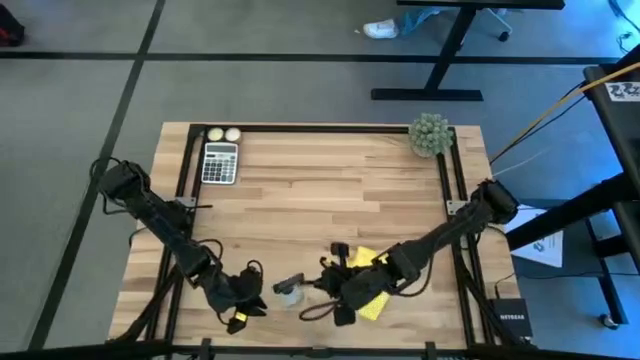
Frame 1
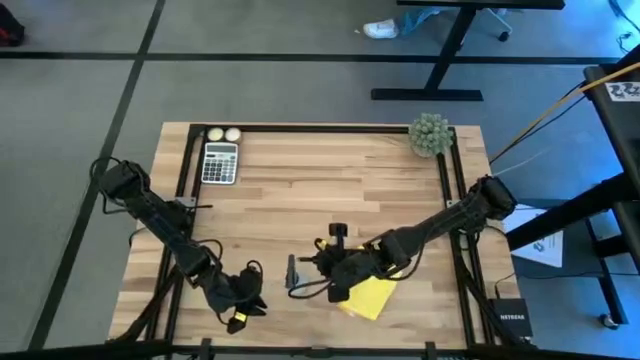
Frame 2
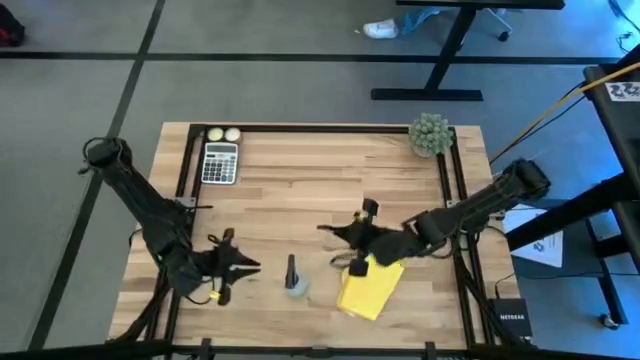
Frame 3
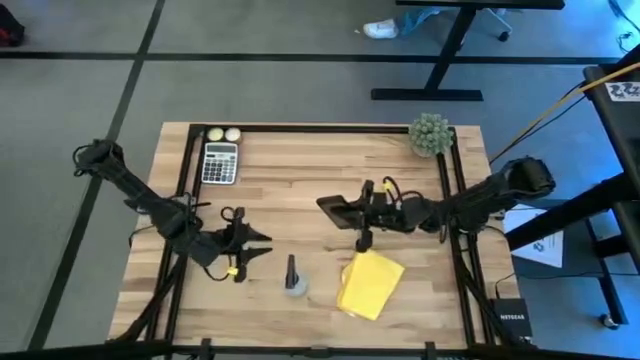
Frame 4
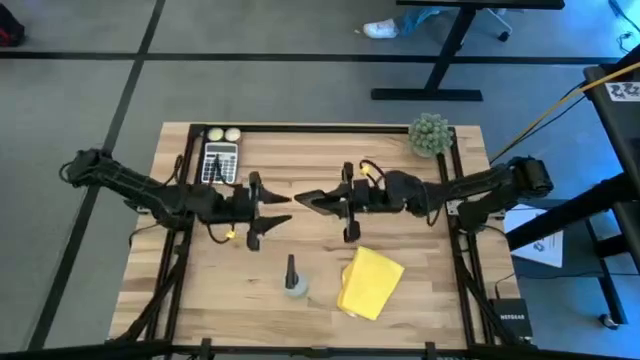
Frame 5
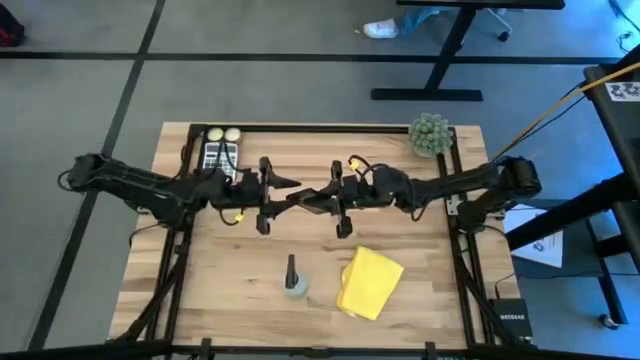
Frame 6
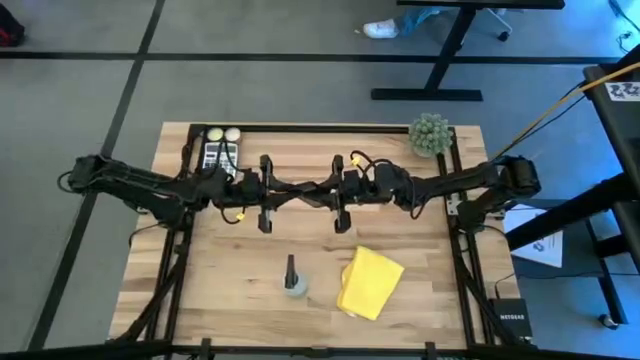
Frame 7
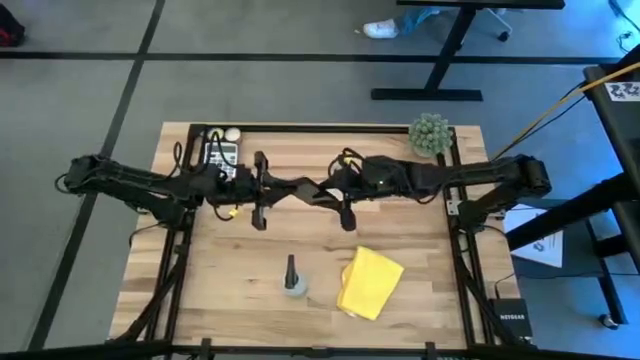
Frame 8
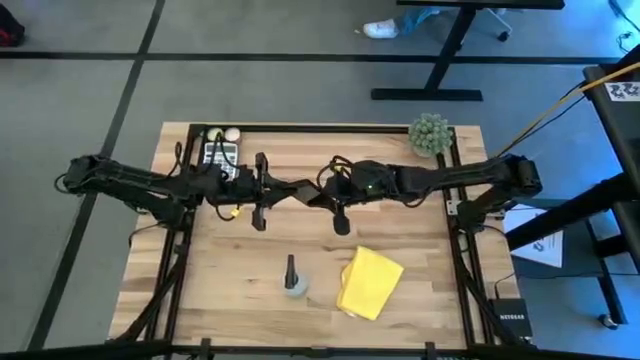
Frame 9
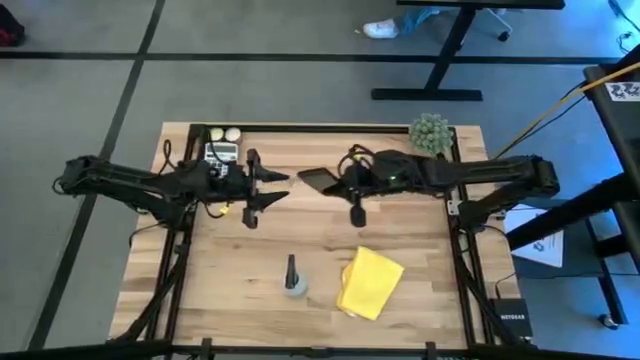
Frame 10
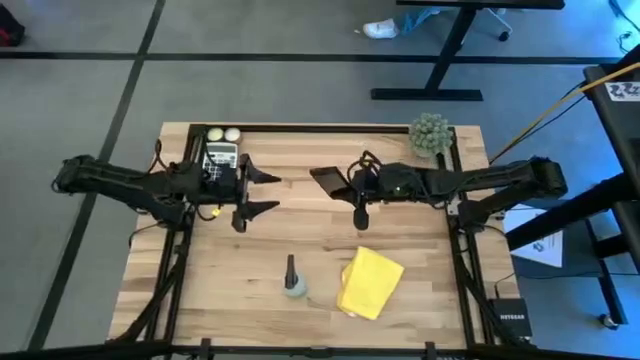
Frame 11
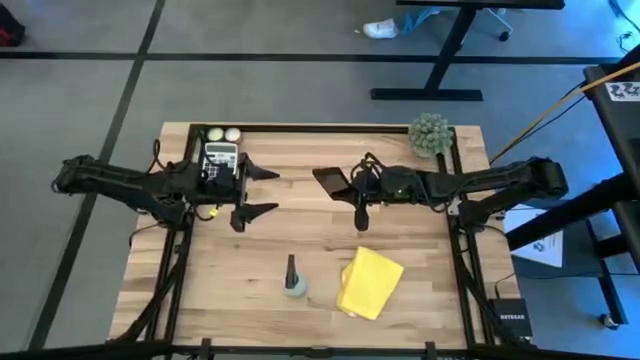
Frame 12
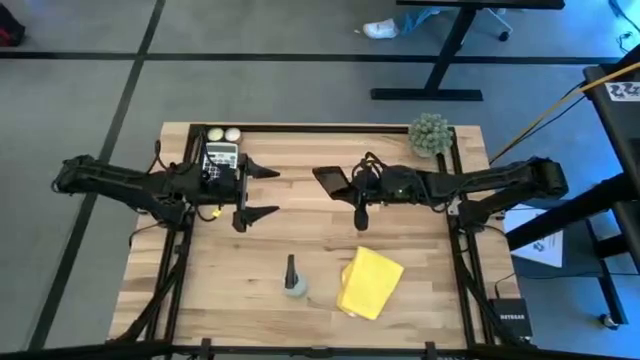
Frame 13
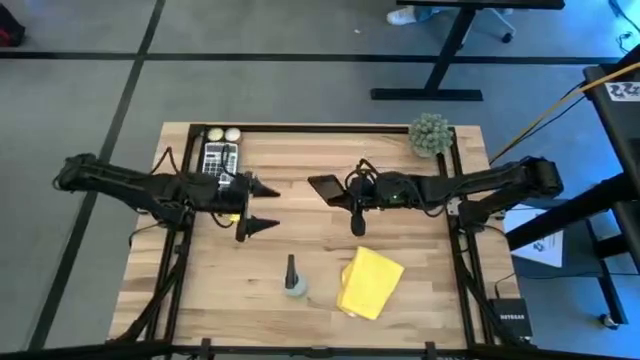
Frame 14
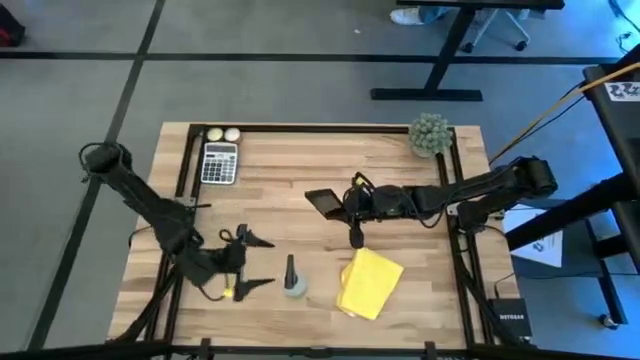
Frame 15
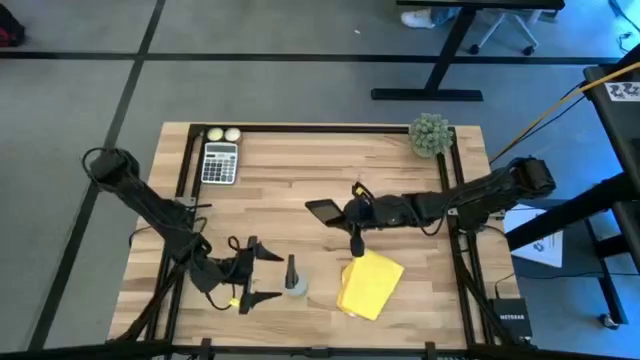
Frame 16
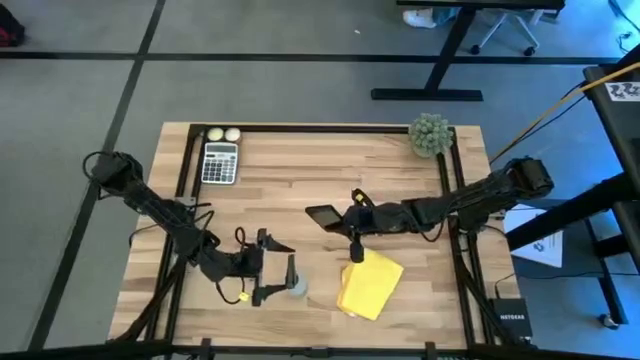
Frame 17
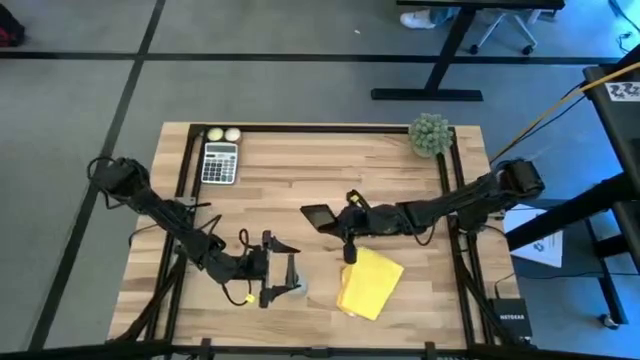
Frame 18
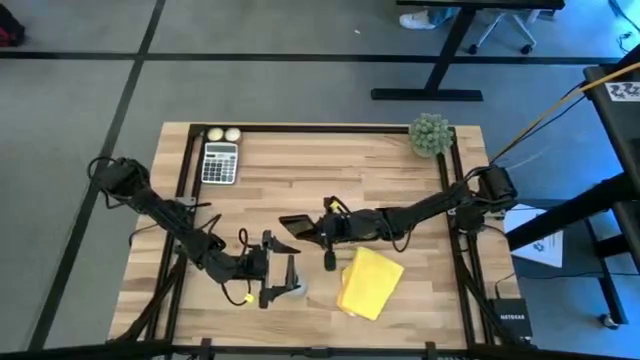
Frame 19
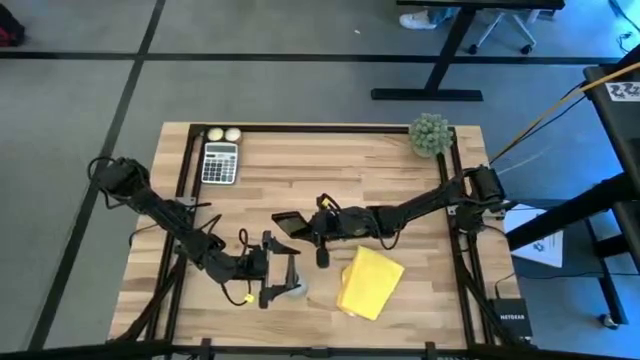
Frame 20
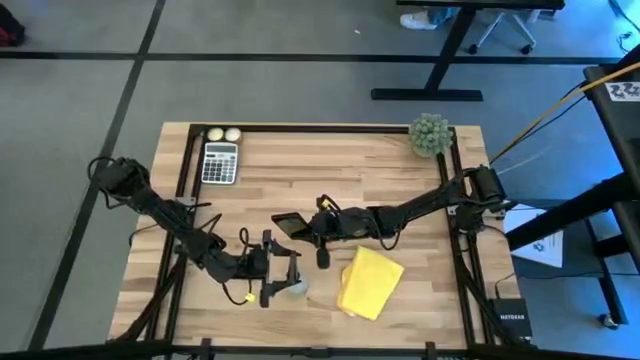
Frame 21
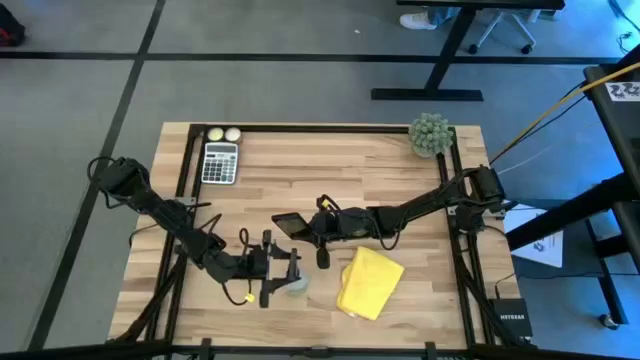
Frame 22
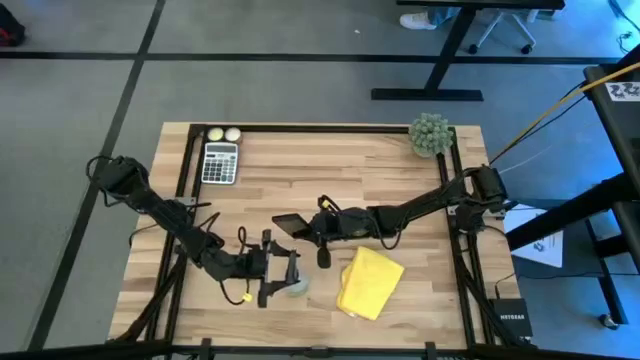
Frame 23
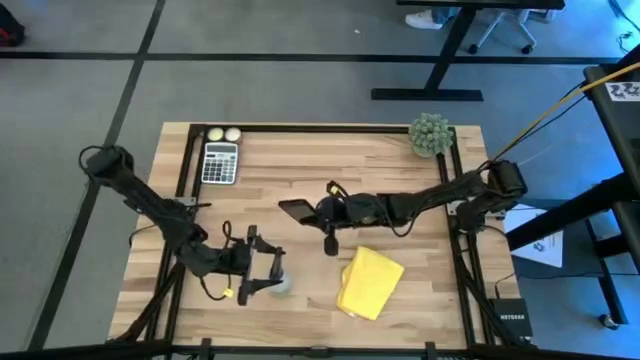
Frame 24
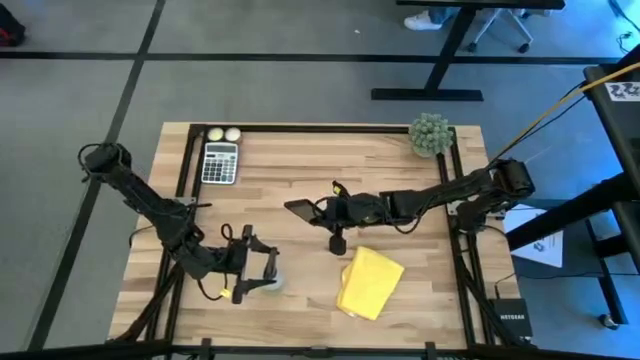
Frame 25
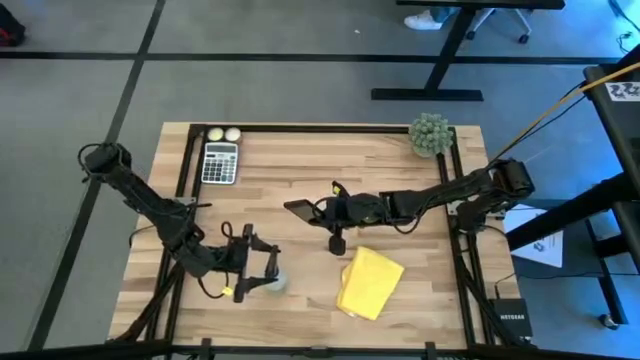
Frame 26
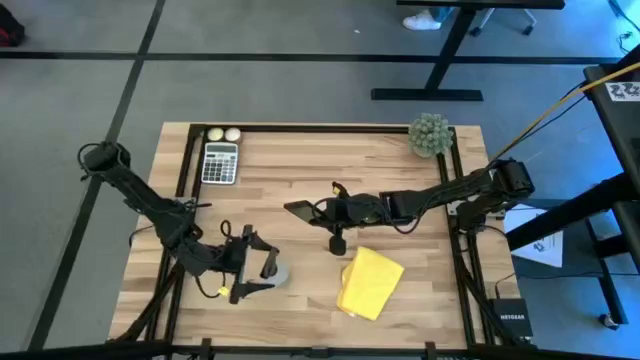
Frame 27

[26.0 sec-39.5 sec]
Task: Apply microfiber cloth
Spray the front of the black cellphone with green spray bottle

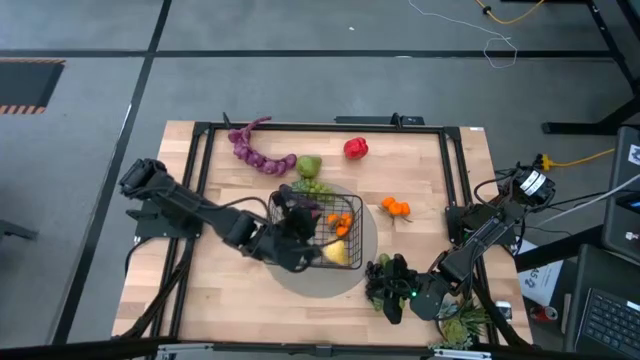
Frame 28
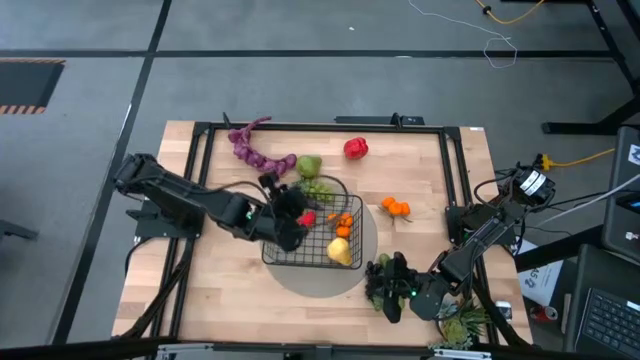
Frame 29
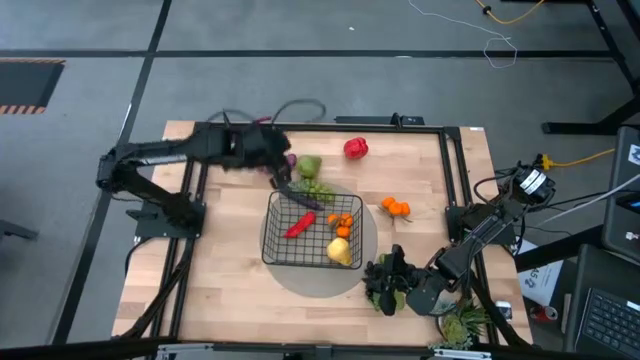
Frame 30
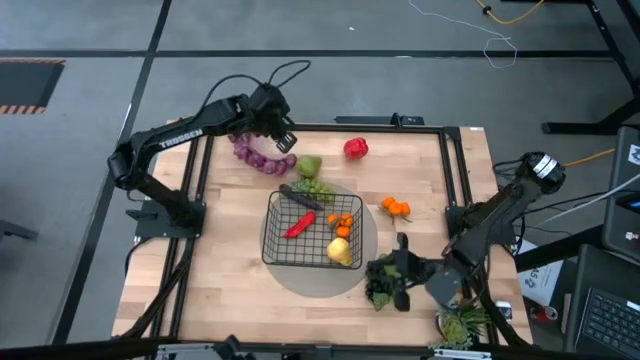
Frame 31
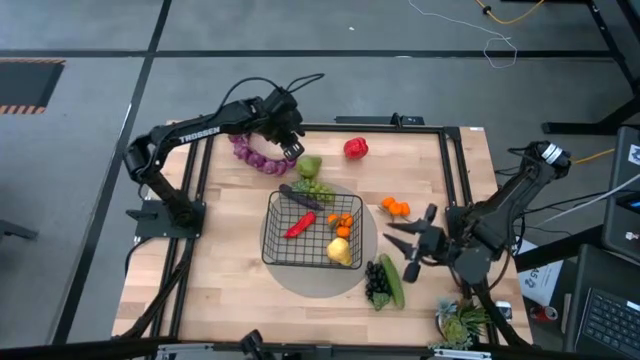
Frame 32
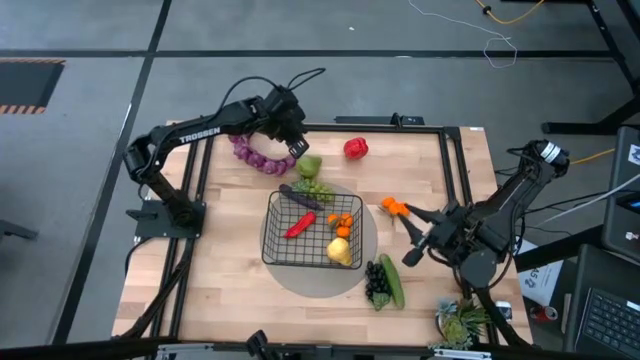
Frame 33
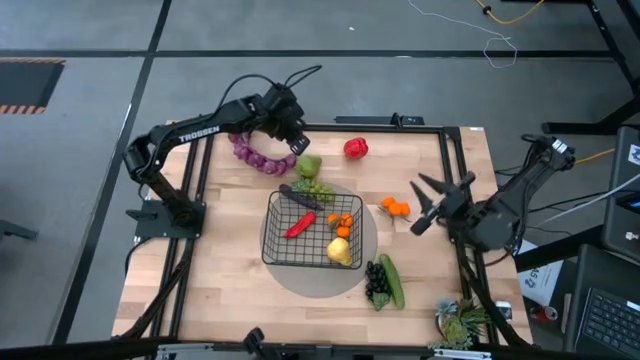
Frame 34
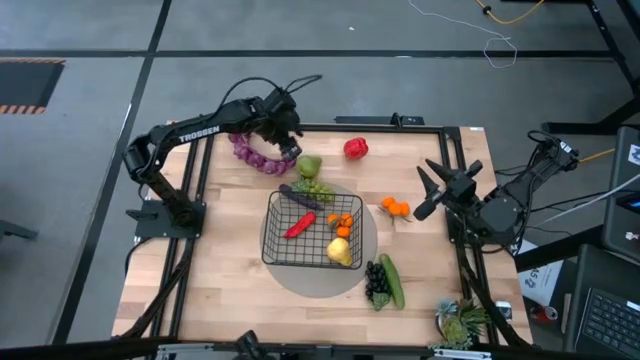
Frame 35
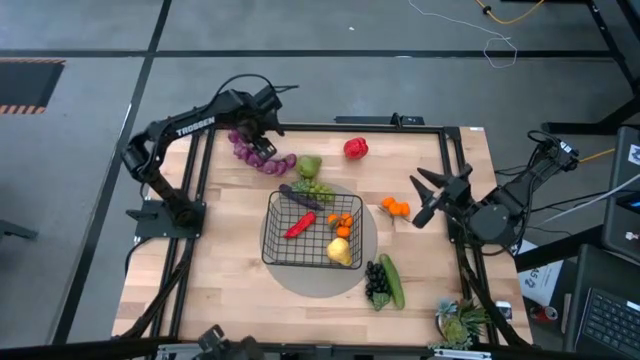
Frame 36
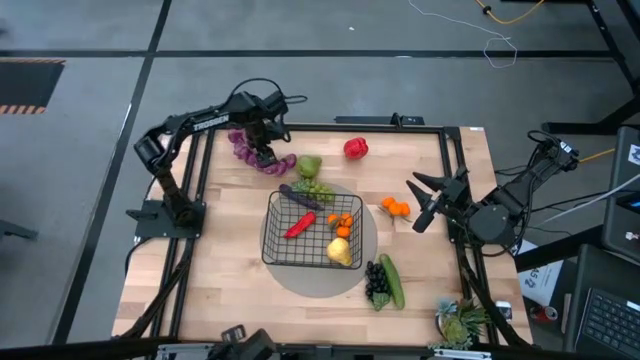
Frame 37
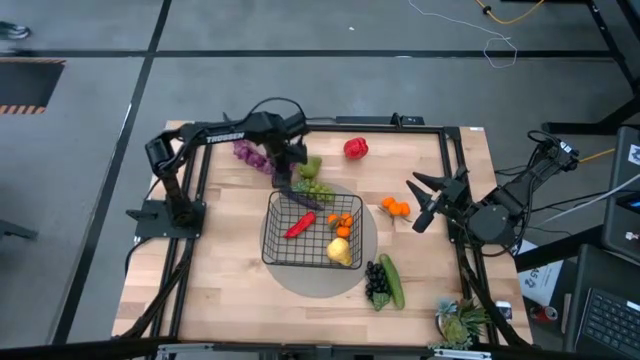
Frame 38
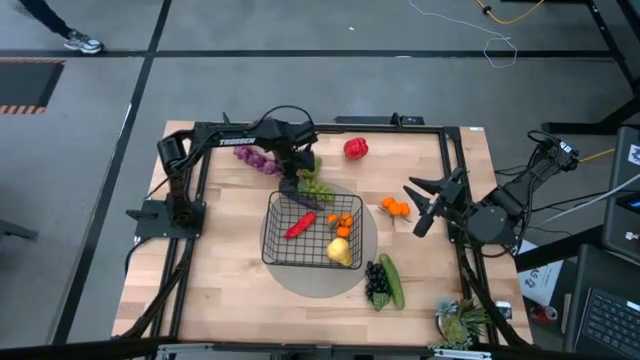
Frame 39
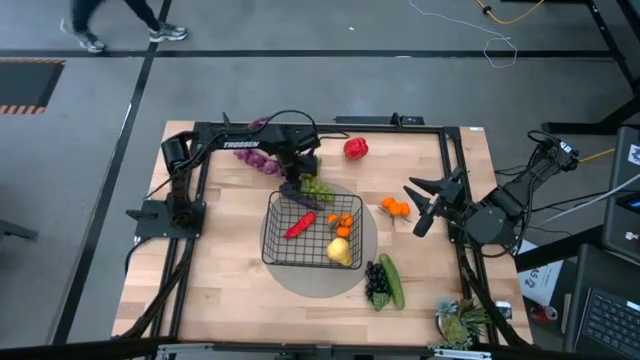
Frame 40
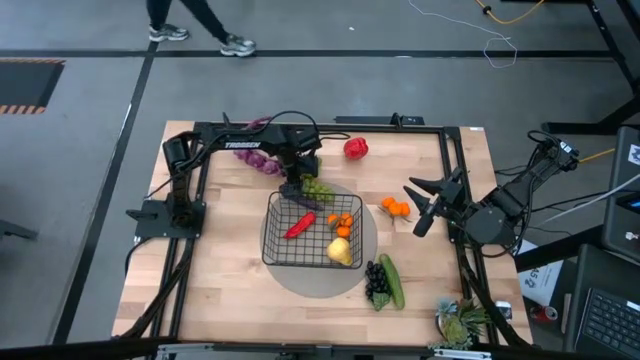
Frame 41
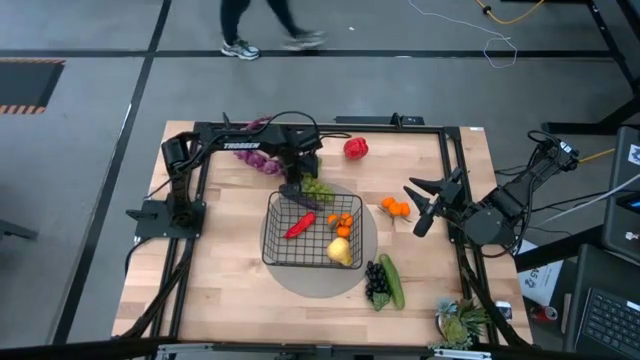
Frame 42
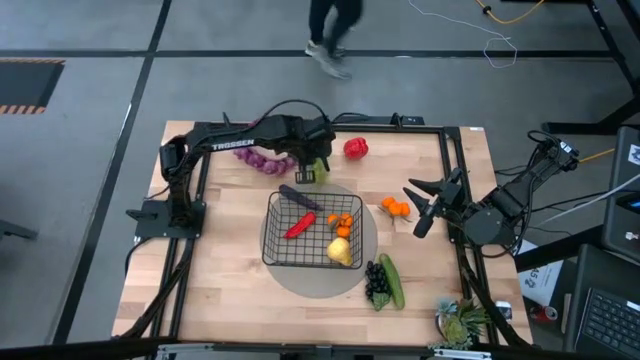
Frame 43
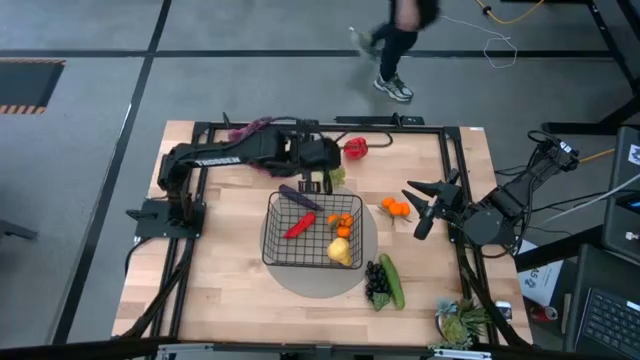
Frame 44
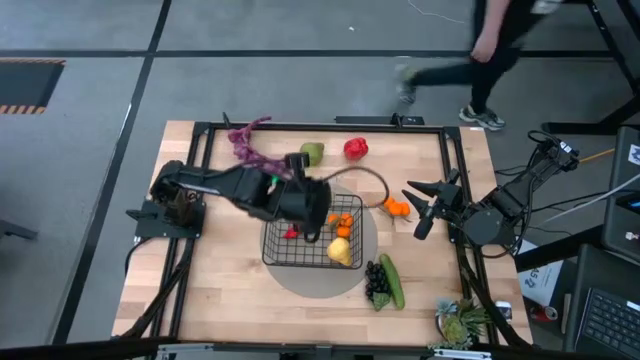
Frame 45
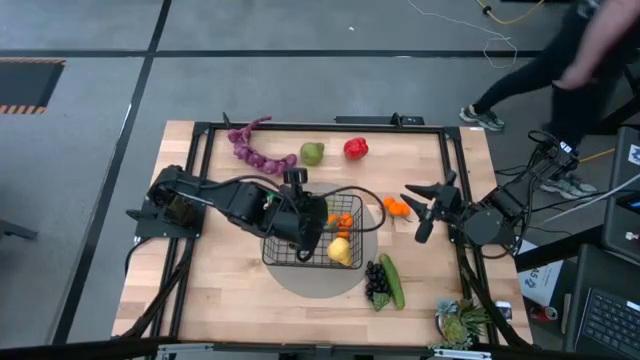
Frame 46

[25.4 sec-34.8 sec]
Task: Build produce basket
Put the green grapes into the black wire basket
